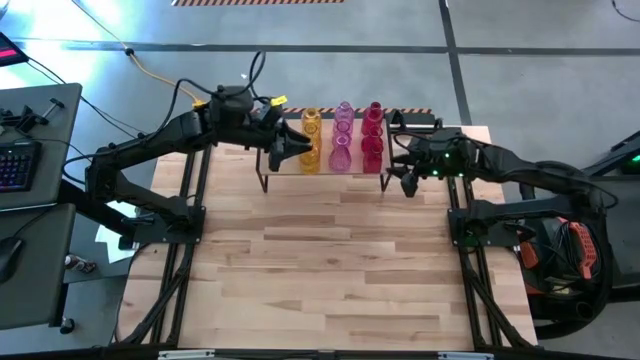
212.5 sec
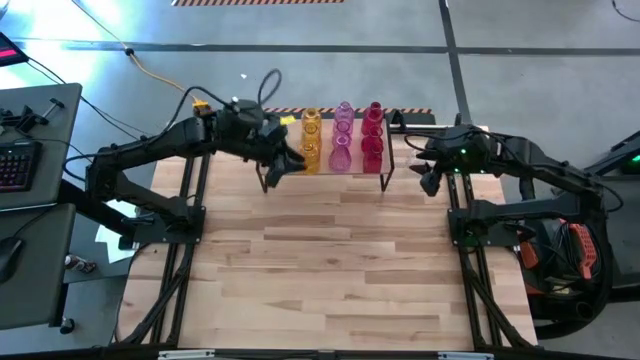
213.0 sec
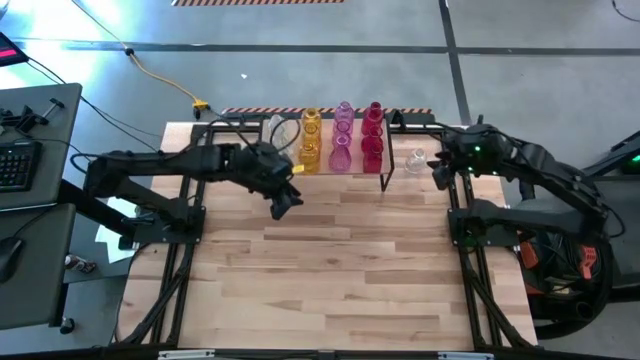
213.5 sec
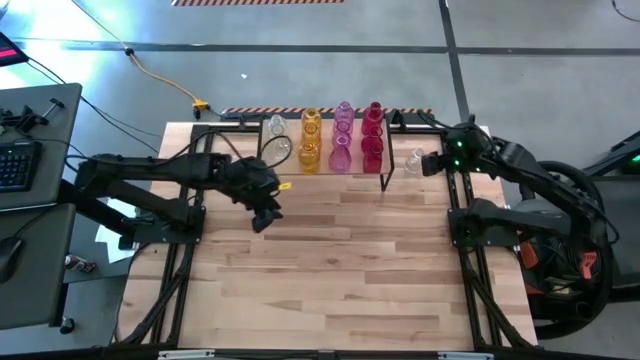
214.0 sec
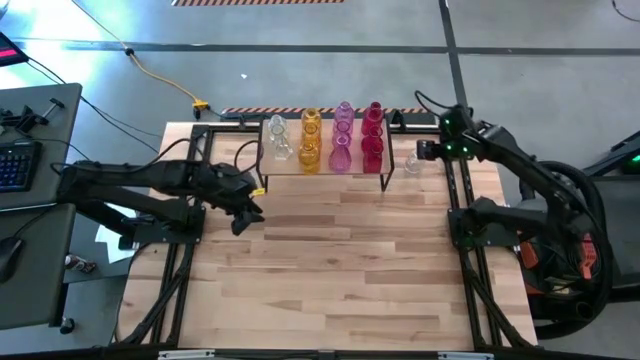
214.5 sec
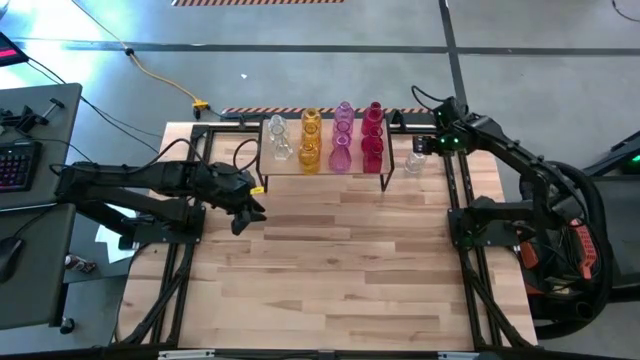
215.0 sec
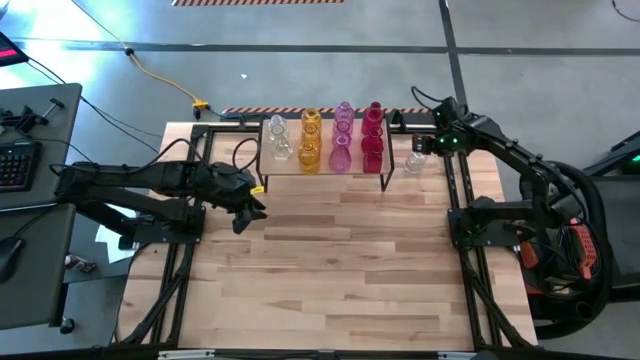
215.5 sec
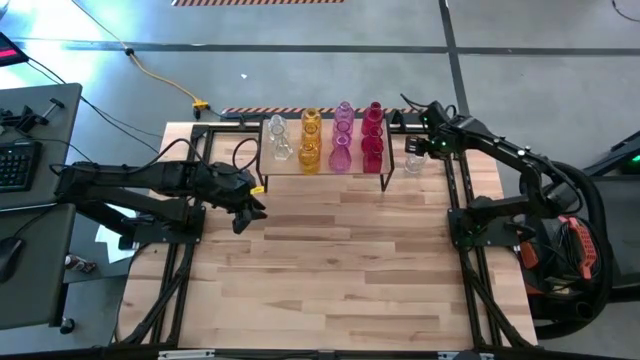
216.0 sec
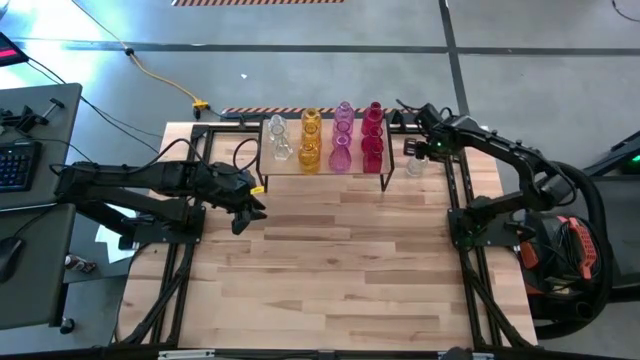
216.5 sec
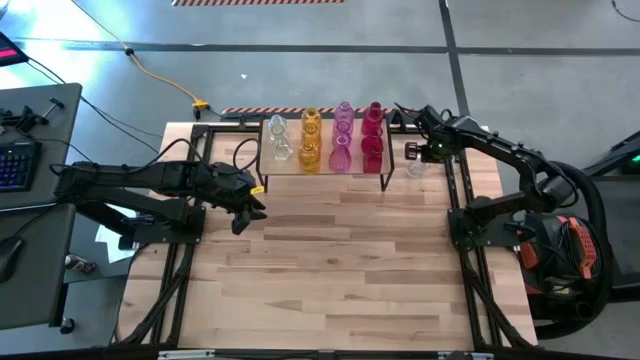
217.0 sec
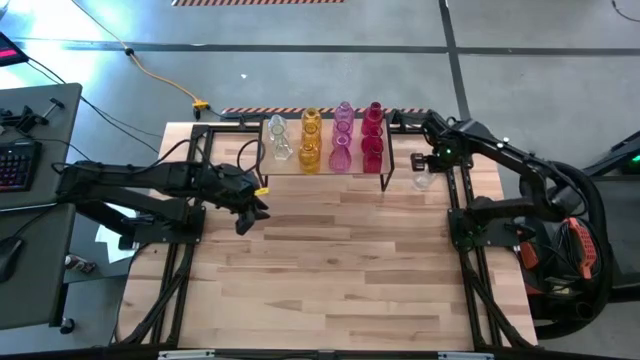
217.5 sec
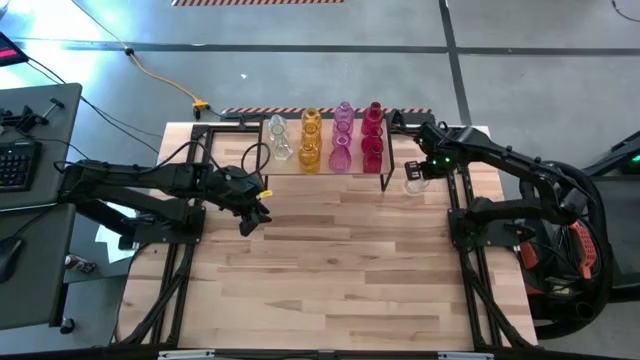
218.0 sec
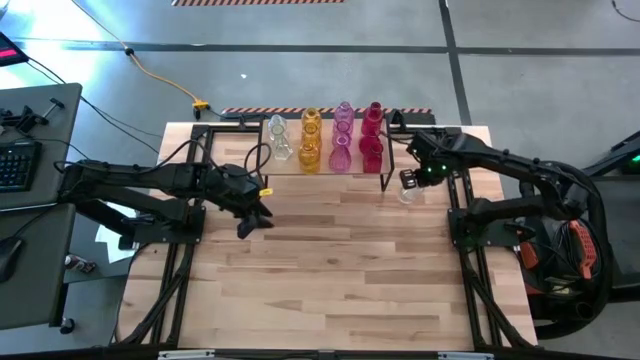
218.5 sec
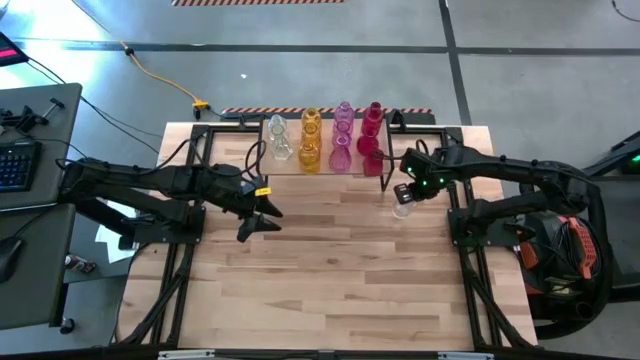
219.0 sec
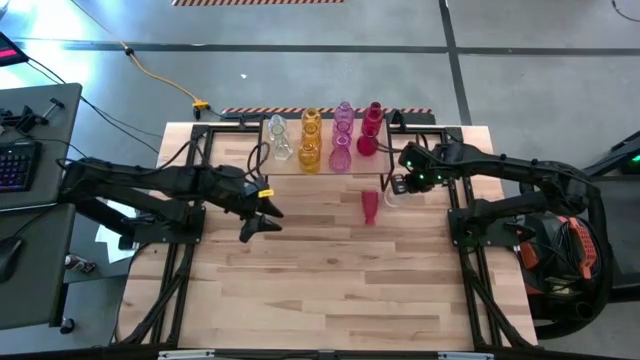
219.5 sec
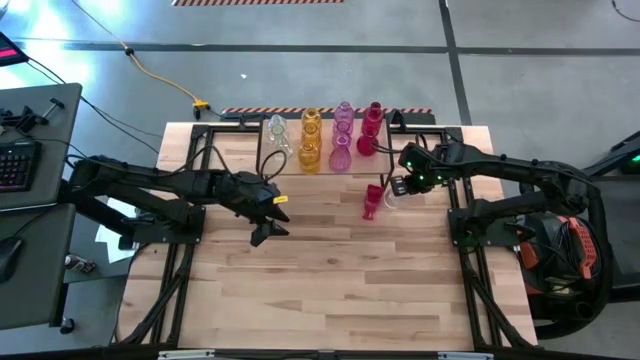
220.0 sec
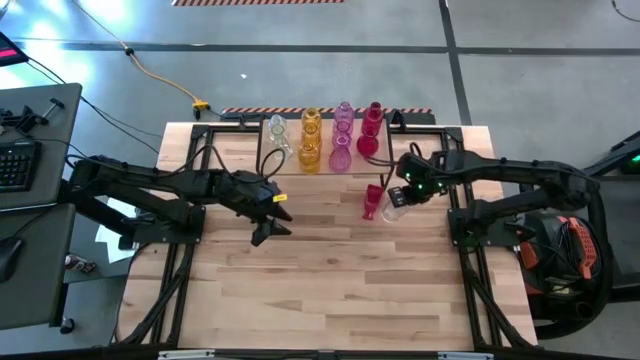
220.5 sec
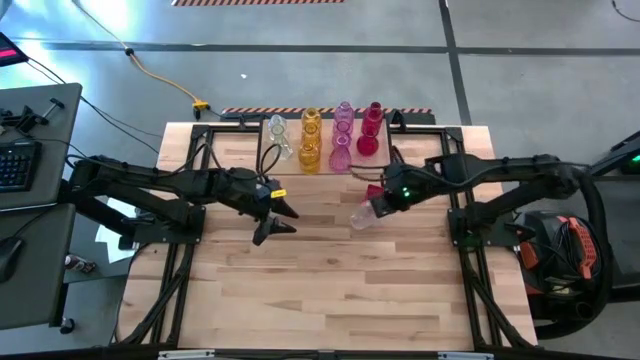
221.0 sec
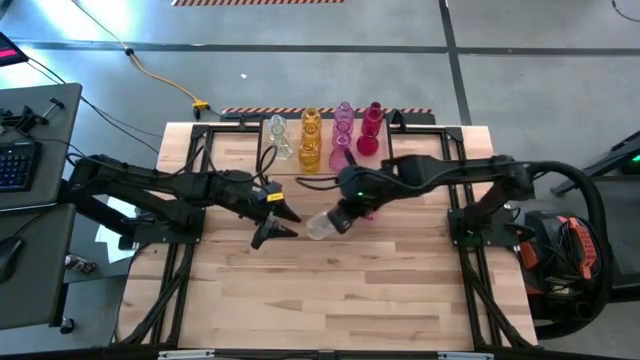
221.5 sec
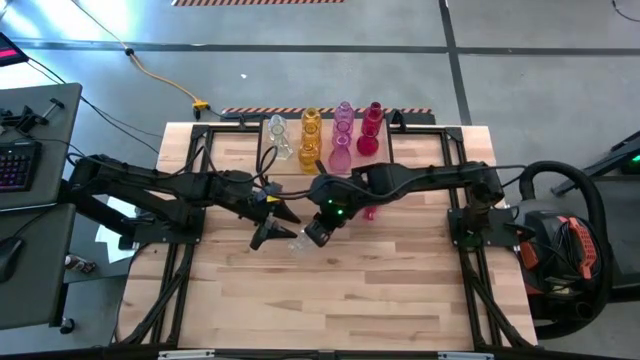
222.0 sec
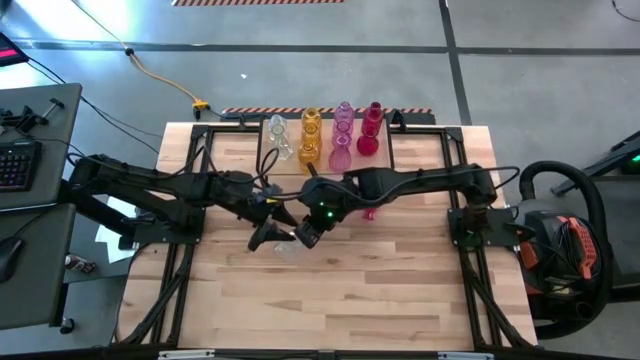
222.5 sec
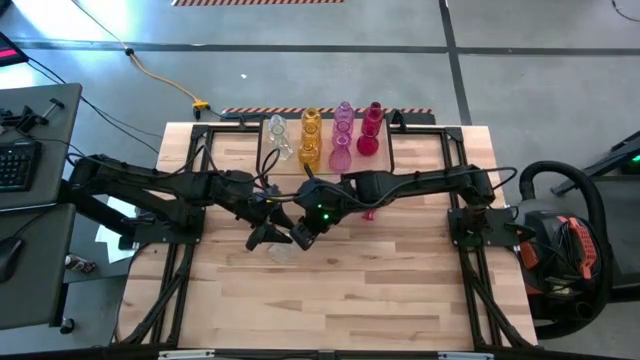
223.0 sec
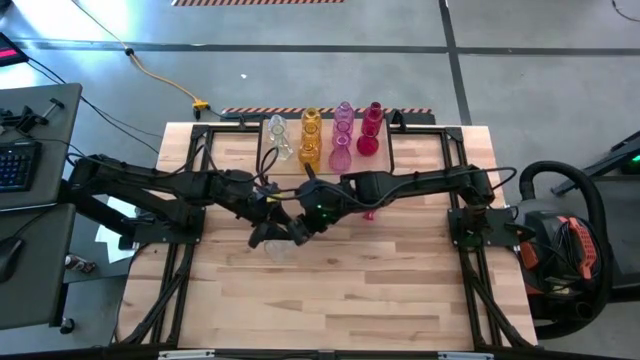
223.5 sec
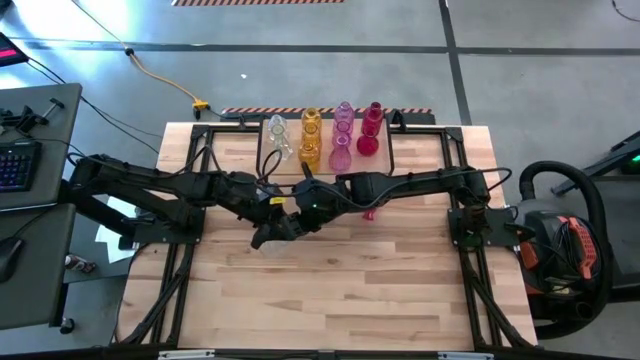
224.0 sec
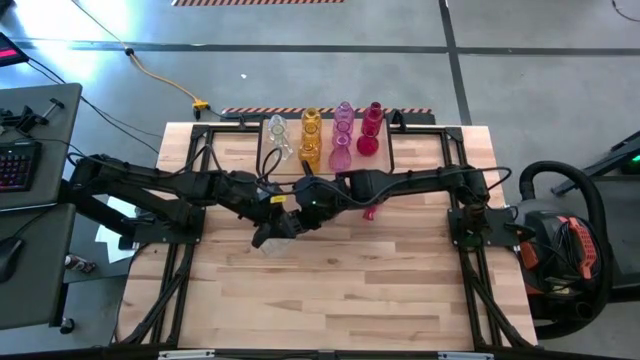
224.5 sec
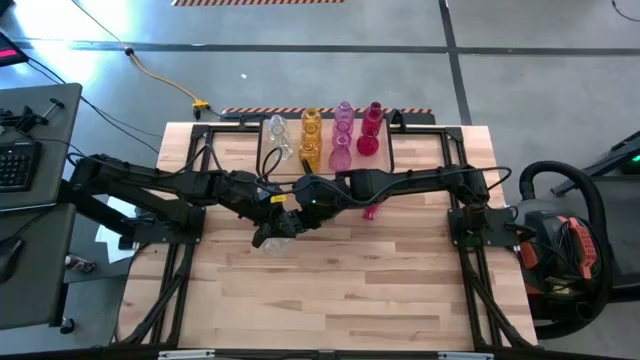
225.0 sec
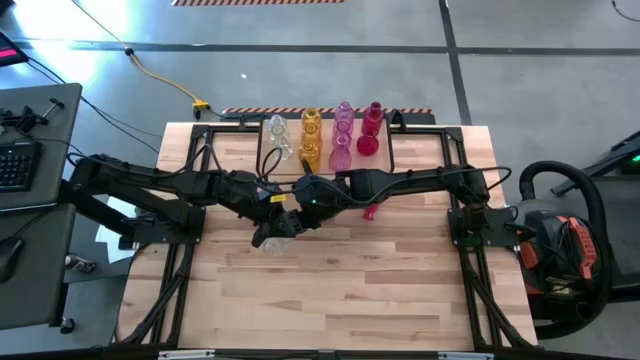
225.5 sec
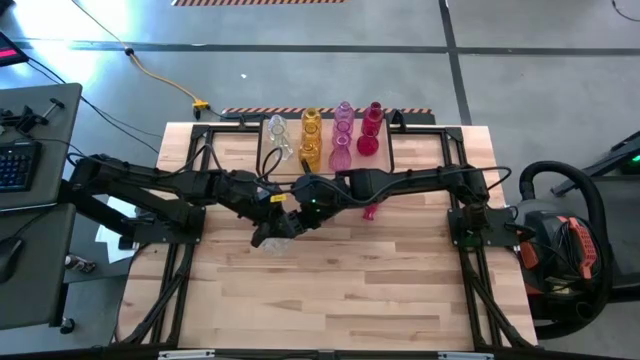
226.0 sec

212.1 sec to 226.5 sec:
Task: sort vases onto shelf
Put the transparent vase aligned with the other transparent vases on the shelf

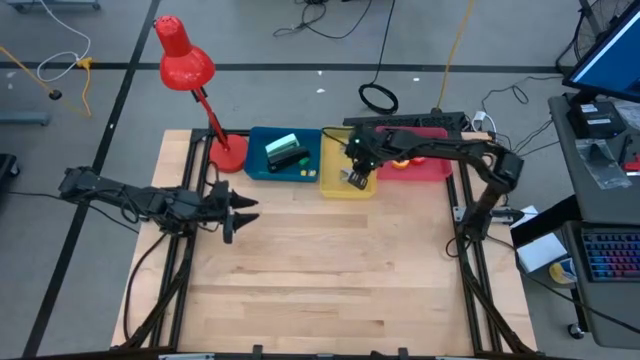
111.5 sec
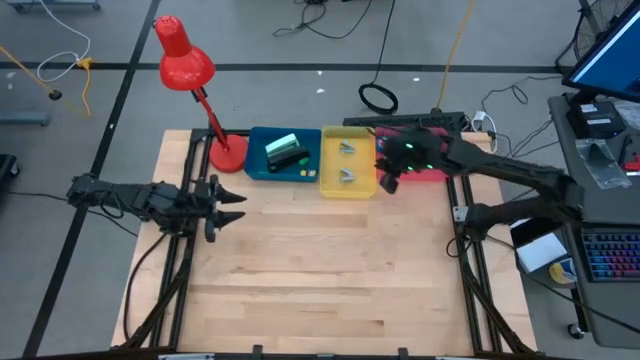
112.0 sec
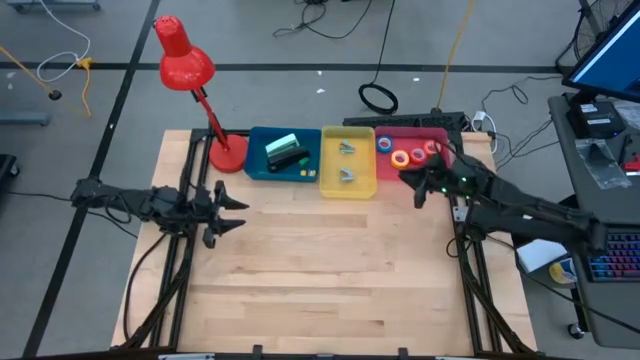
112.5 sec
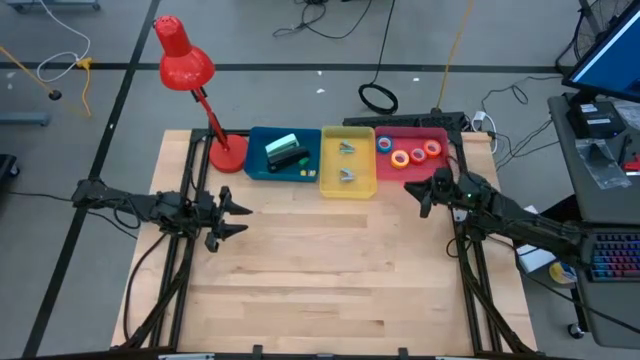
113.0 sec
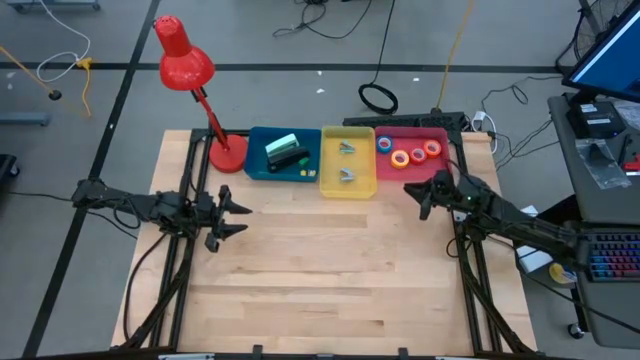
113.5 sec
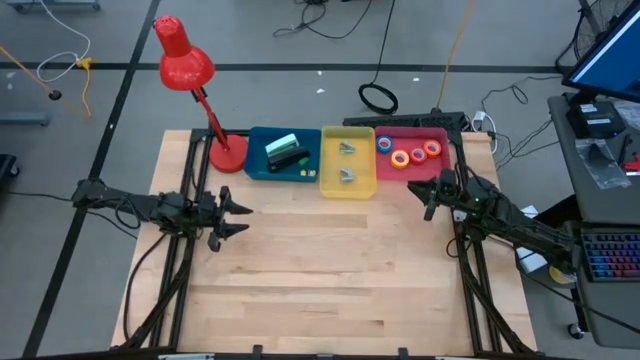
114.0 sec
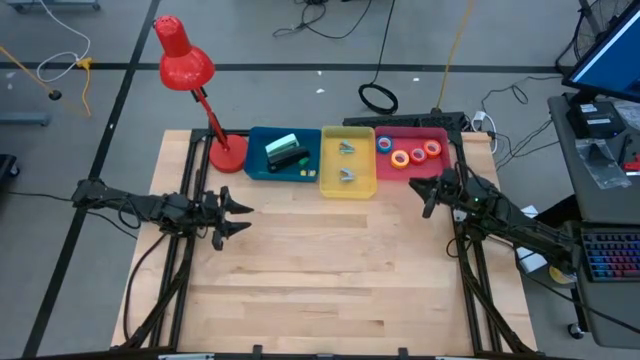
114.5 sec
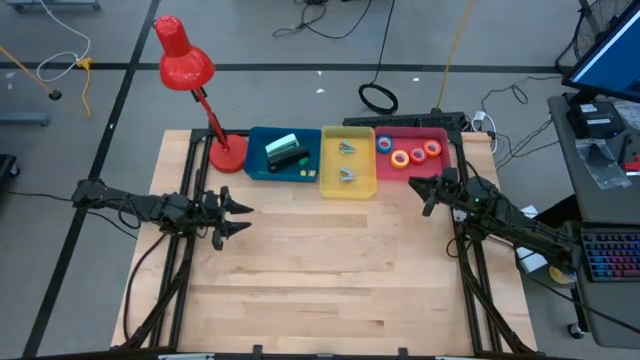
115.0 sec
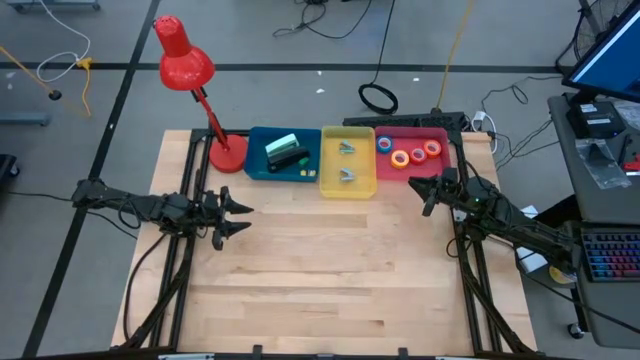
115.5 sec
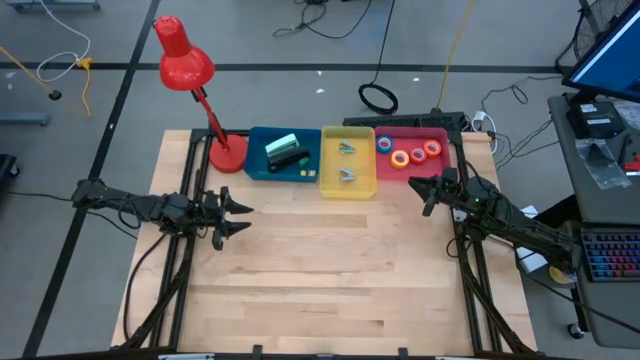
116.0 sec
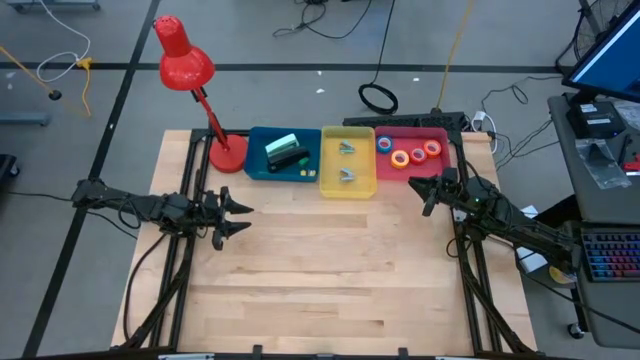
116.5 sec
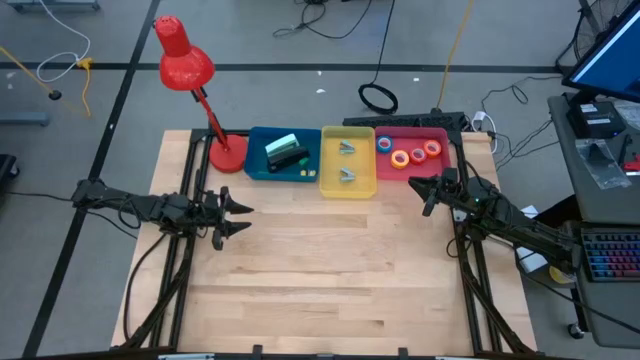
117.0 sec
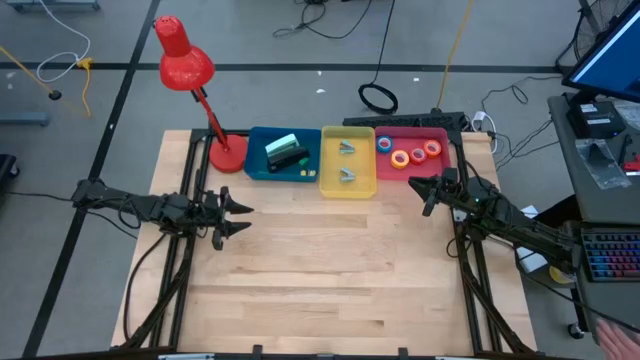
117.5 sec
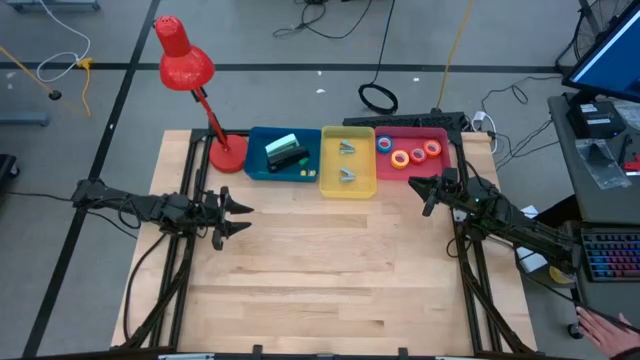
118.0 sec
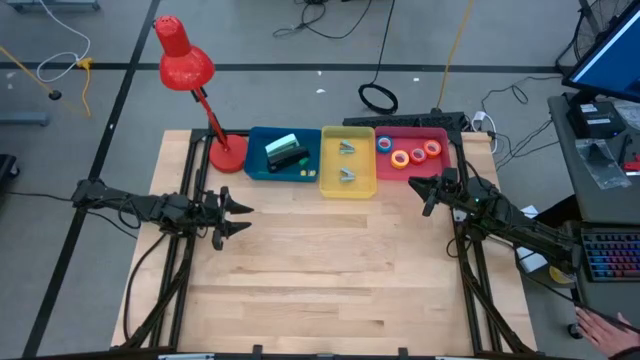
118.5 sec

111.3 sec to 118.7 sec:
Task: Pick and place Stapler, Stapler remover, tape
Return to home position
